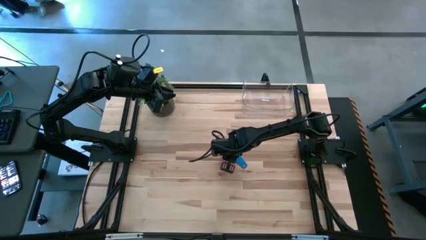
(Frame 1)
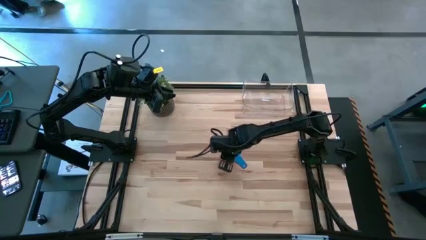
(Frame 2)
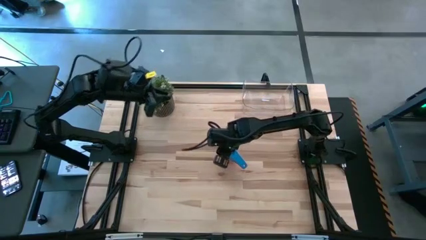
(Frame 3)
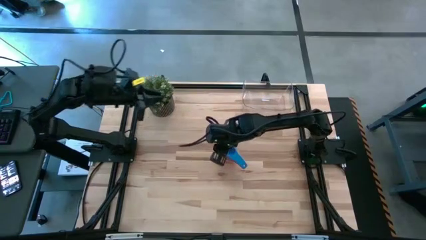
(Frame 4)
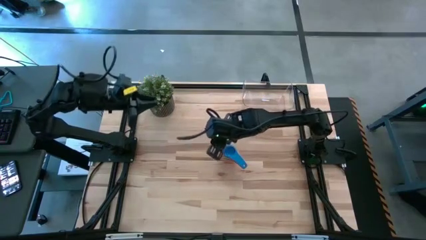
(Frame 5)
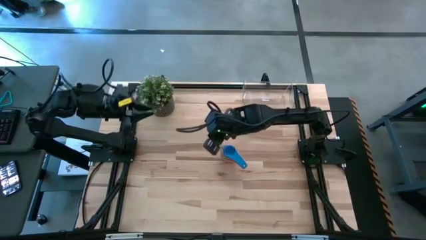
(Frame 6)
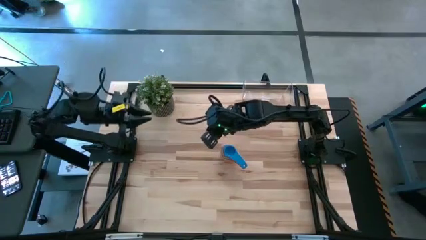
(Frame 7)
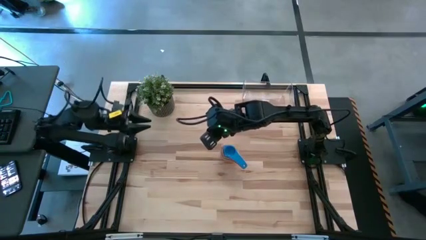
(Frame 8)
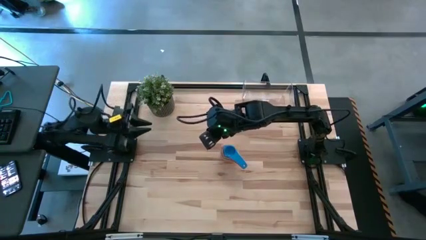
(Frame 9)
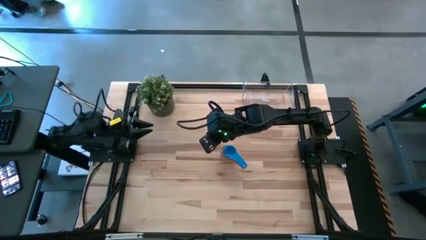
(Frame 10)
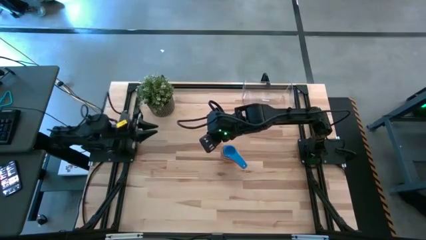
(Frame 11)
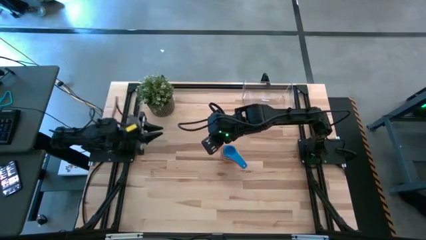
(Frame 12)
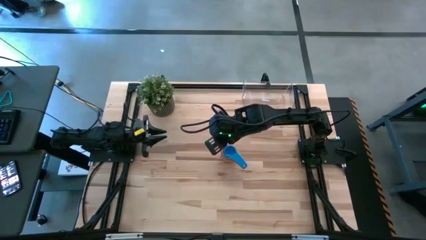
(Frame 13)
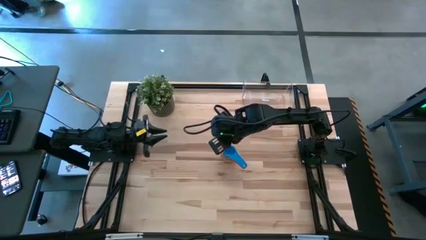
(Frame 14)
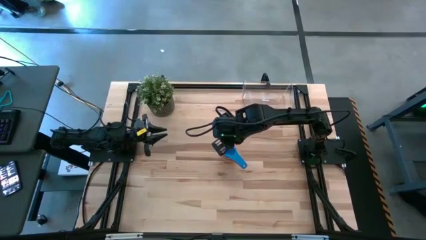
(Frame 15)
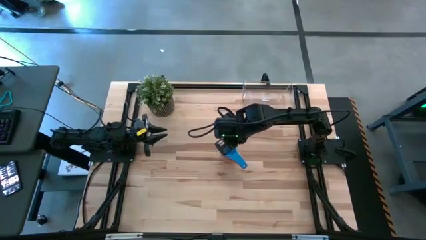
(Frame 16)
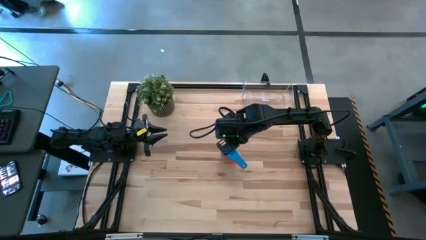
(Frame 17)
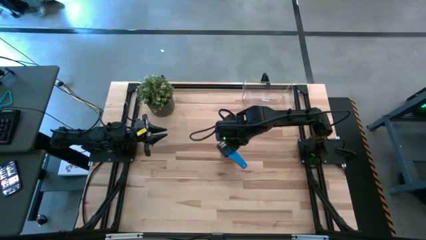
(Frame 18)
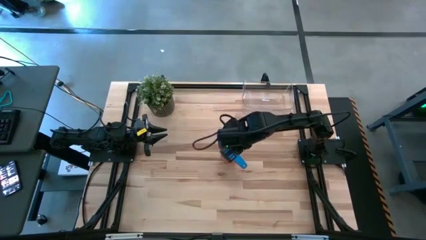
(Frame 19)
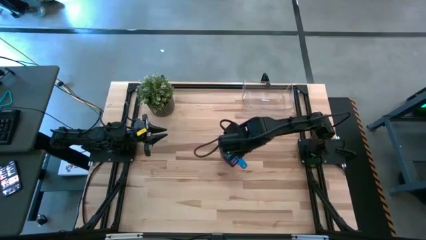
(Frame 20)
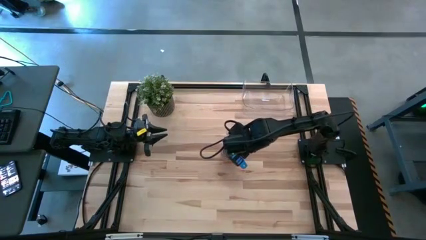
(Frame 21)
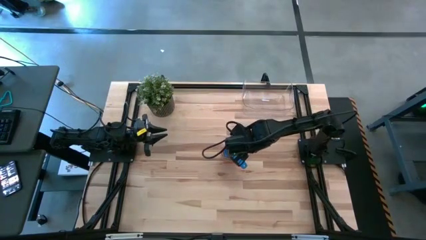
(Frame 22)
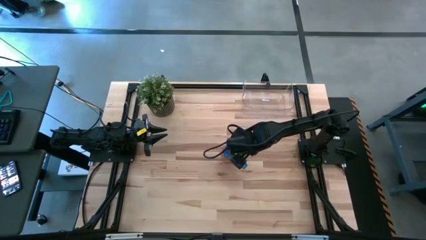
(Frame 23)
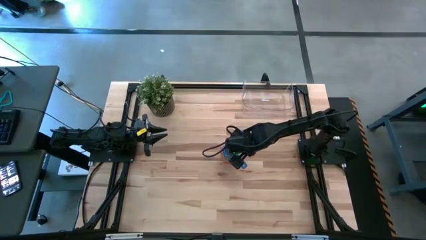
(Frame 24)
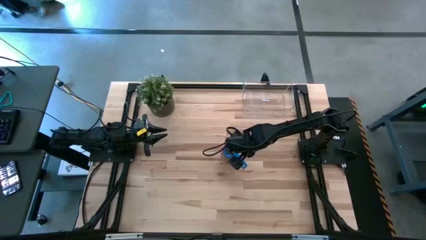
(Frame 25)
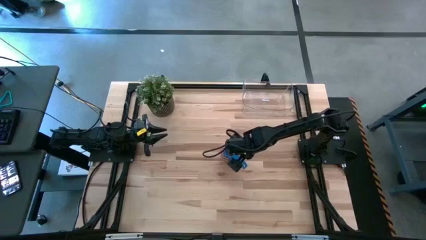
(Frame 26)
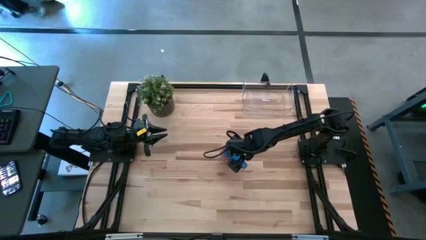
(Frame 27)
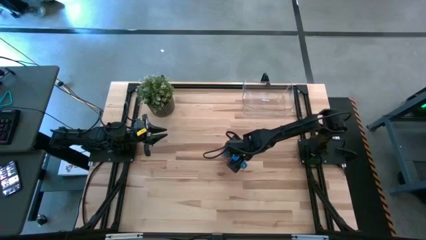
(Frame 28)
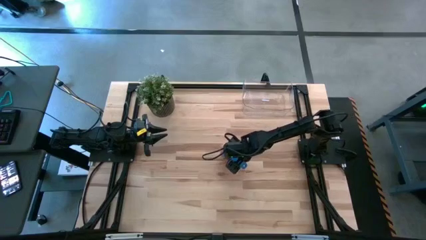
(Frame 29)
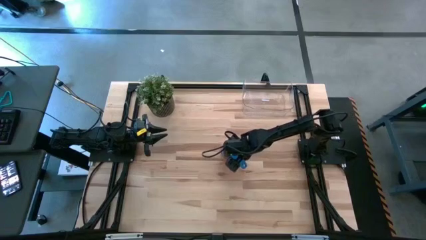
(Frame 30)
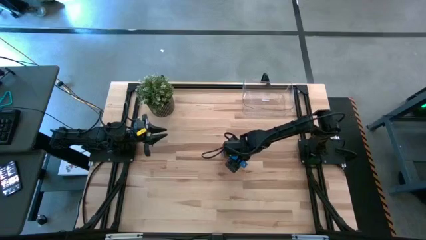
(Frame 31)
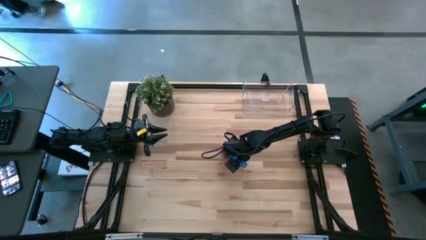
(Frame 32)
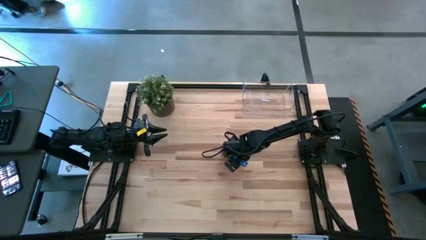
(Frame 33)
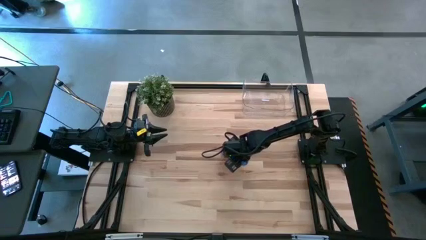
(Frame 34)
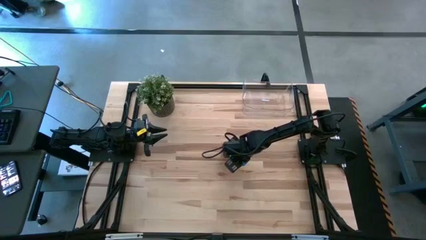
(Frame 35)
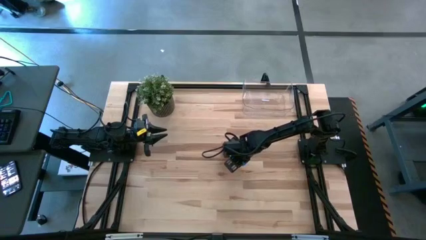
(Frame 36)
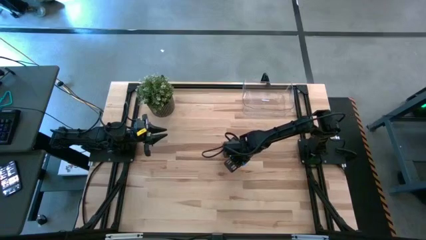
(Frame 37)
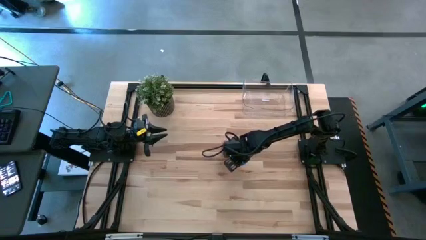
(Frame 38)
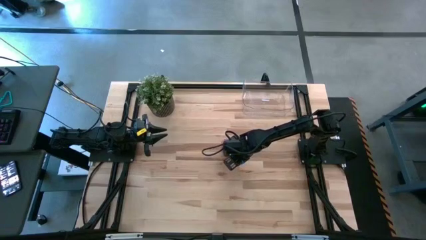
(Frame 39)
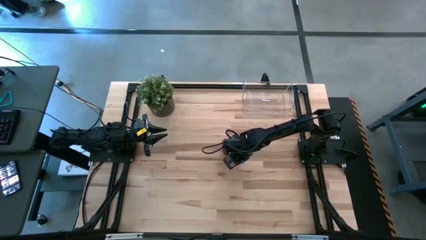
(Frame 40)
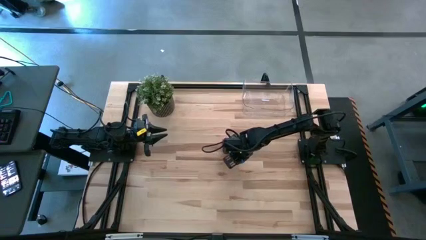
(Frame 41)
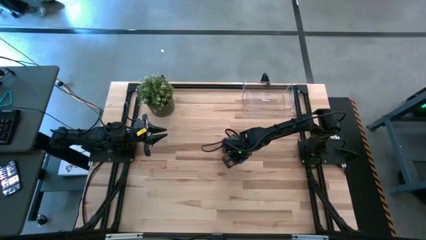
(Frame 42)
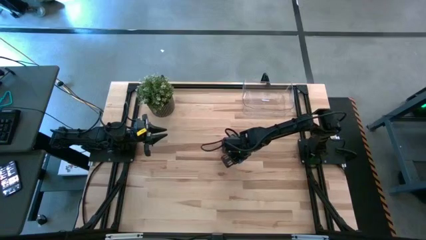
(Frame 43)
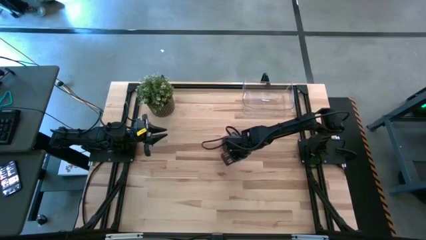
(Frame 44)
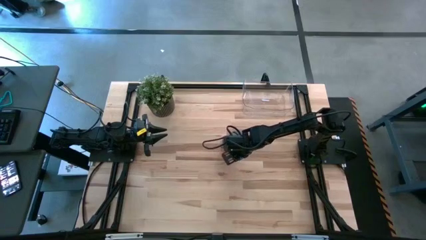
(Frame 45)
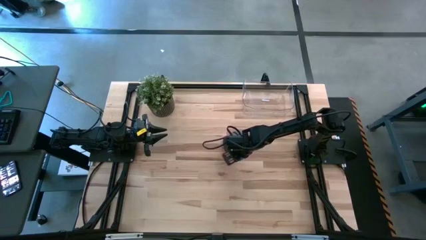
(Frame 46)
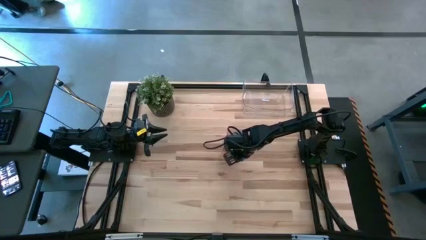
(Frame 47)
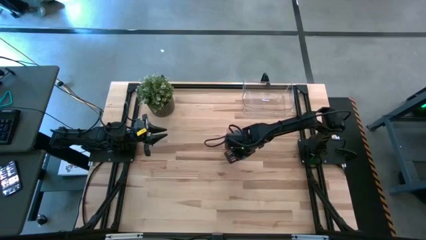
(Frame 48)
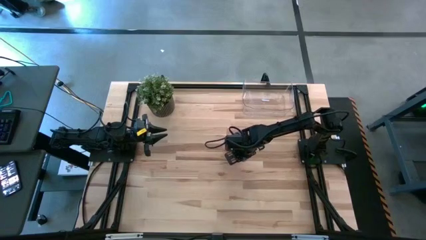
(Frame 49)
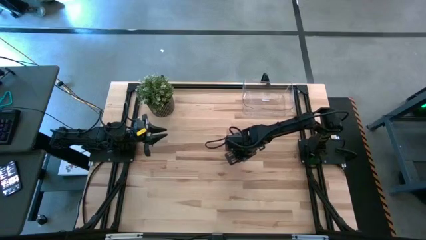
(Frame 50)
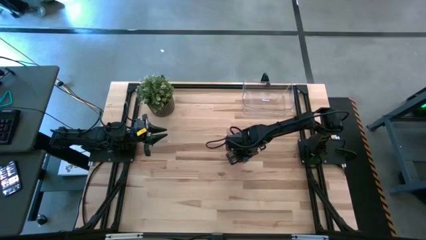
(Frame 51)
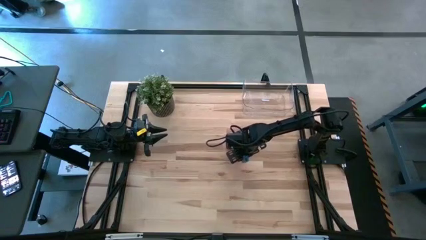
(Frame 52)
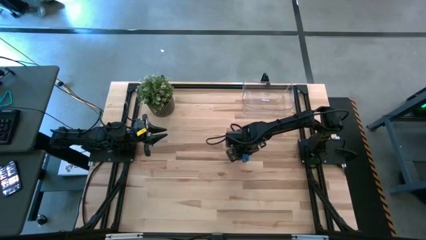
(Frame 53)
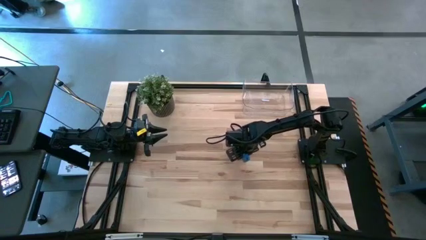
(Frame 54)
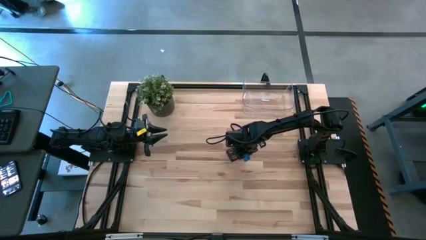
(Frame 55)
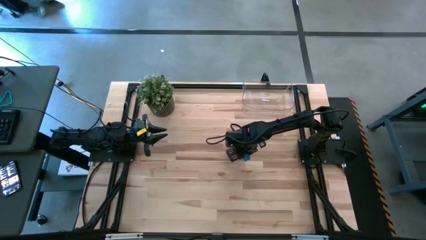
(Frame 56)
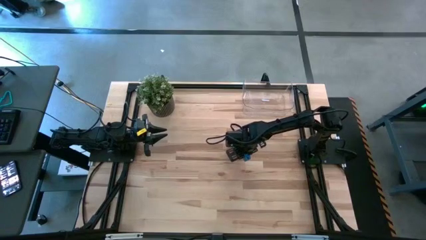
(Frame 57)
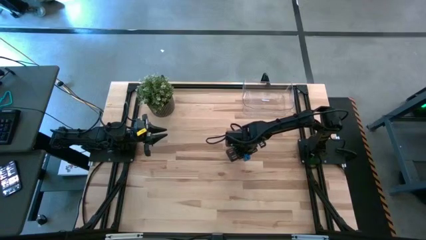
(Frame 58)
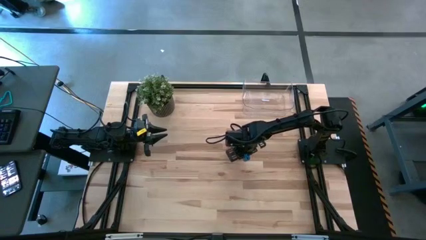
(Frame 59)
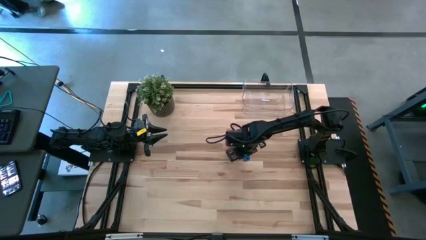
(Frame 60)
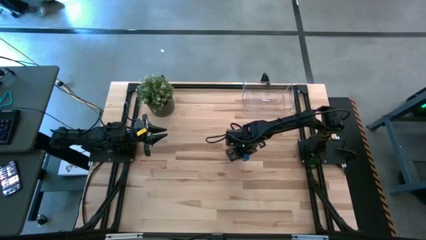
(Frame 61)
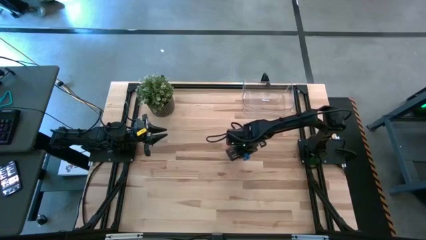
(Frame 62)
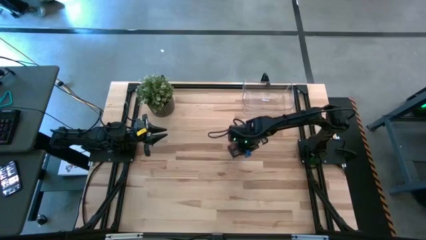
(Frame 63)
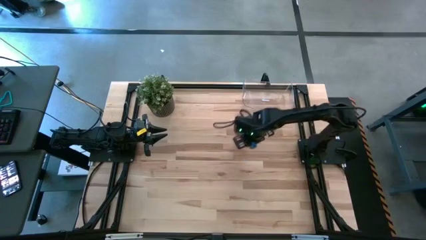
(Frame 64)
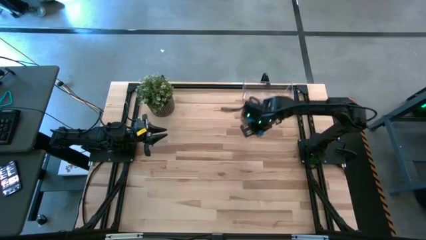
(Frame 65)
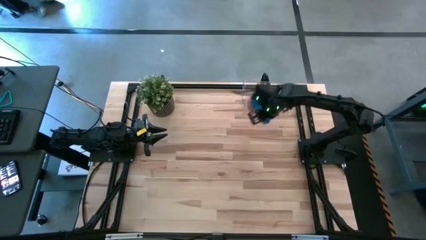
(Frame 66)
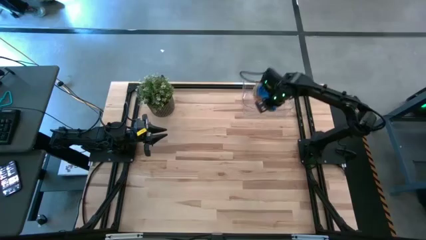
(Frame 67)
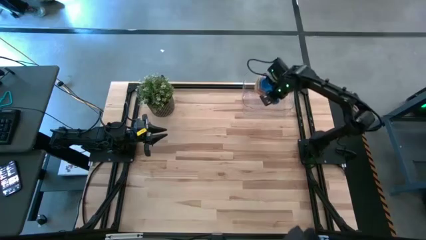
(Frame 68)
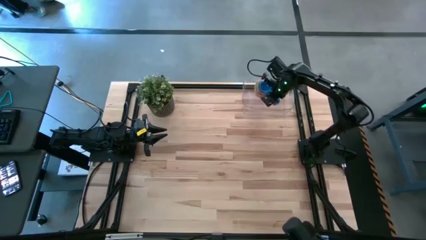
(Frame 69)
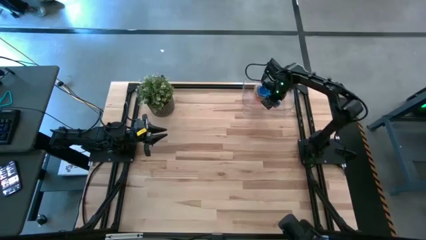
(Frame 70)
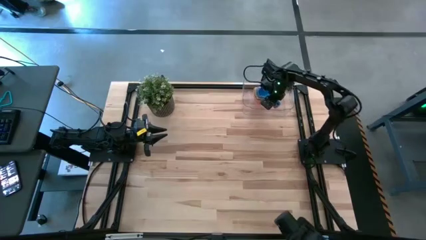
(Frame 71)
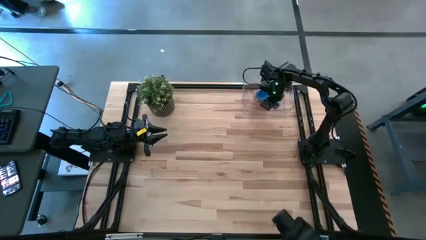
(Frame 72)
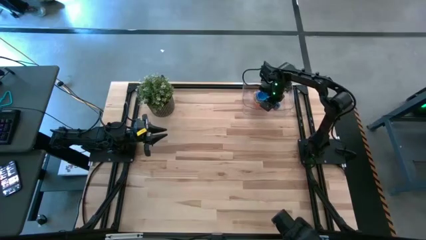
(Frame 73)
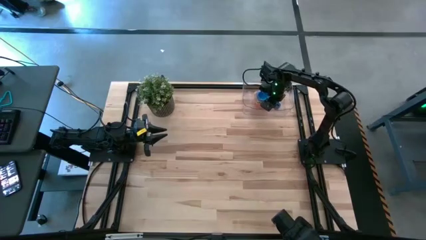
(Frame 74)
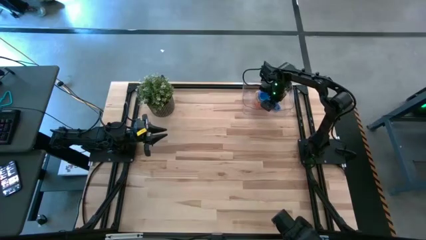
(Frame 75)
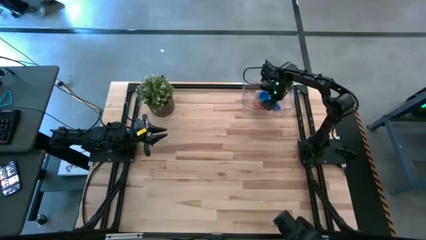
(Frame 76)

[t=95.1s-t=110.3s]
Task: Nest measuring cups in basket
Put the stacked measuring cups into the transparent bin

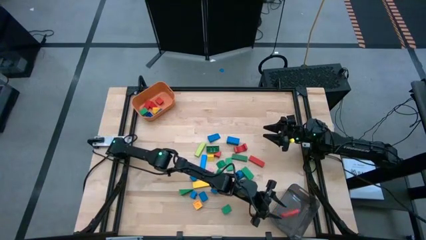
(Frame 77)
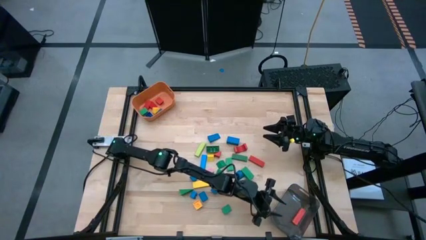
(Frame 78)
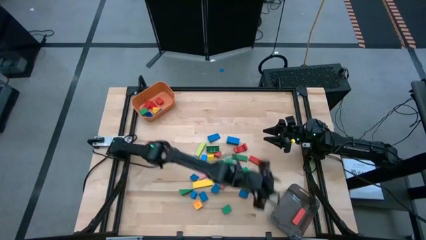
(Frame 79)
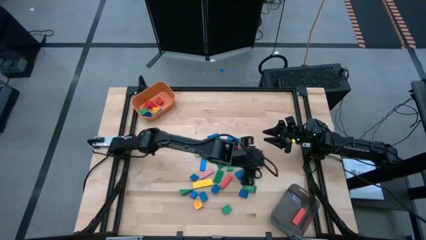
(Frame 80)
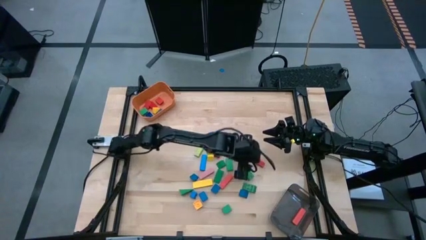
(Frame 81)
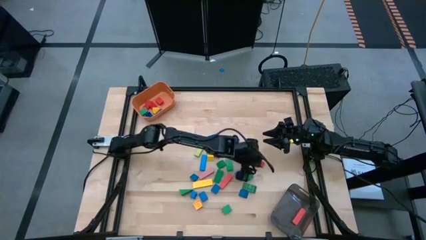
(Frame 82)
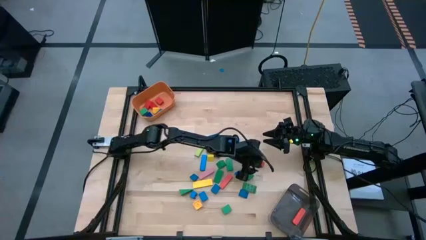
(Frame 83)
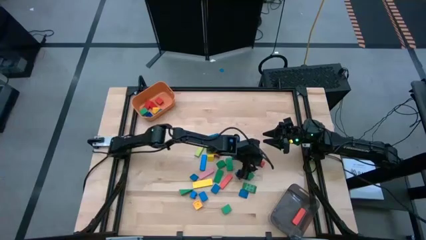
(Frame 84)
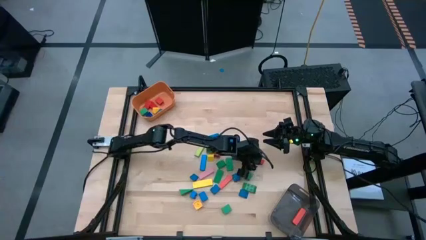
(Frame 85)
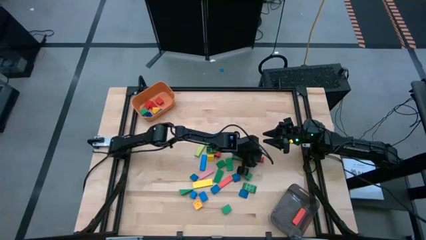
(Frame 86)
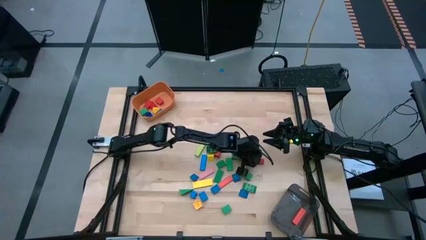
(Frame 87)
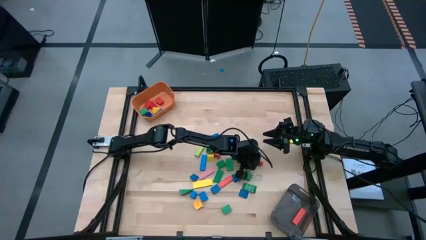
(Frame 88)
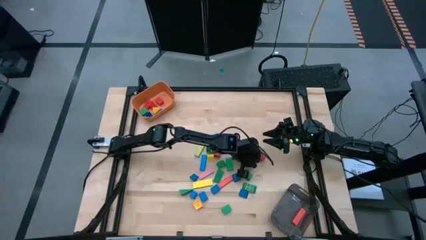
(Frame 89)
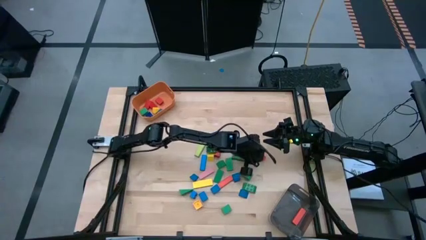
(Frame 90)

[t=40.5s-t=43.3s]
Task: Sort blocks by size
Put the big orange block into the black bin
